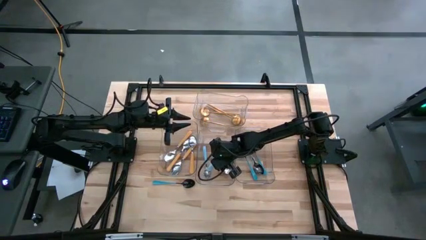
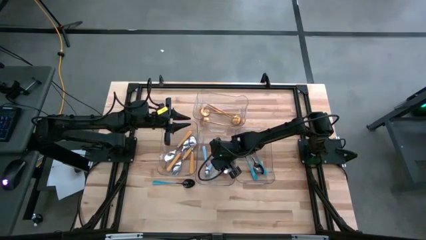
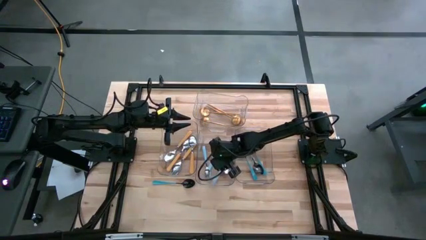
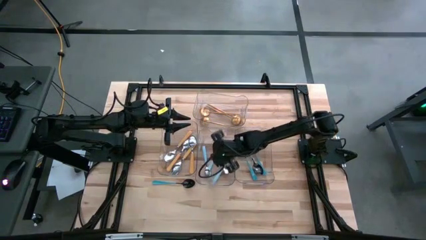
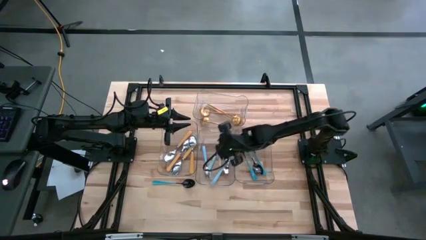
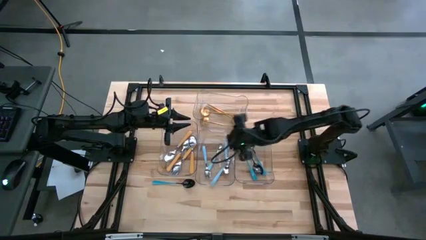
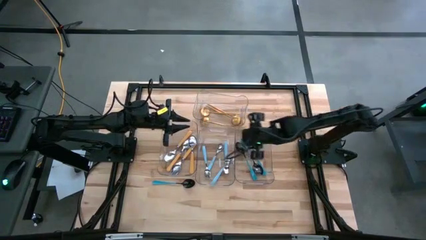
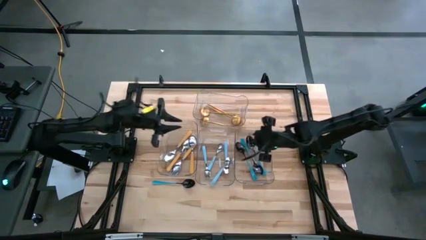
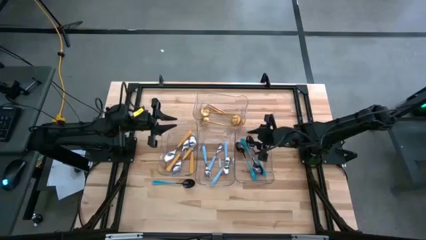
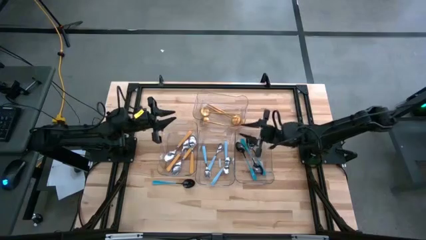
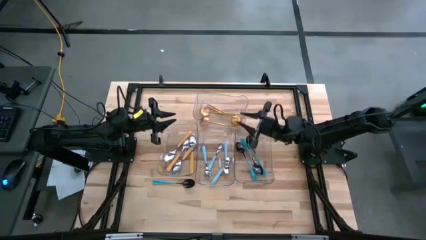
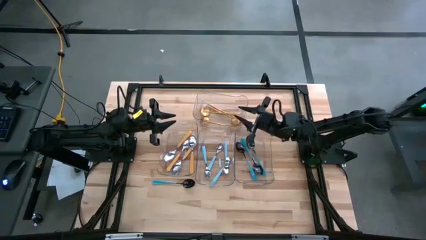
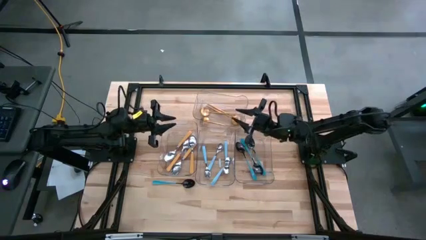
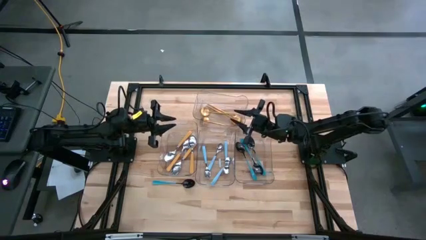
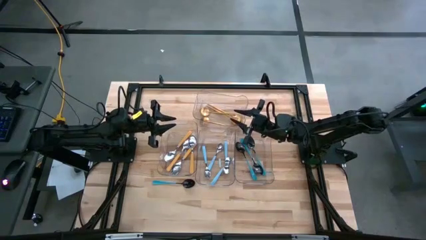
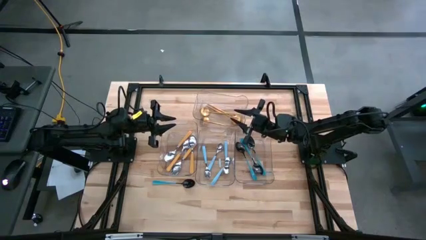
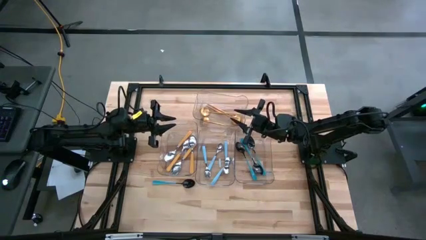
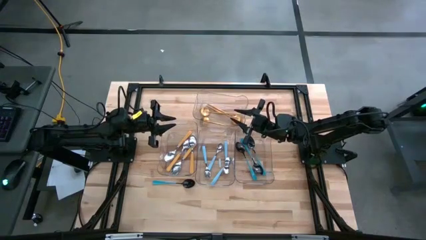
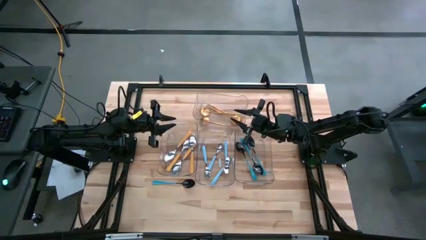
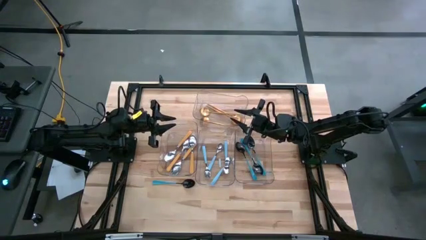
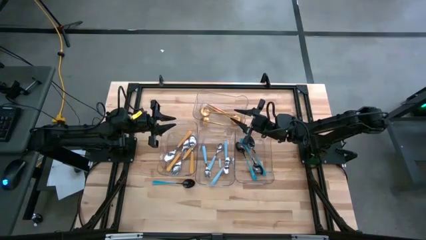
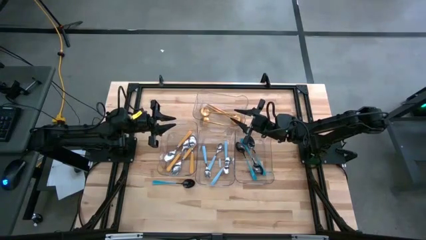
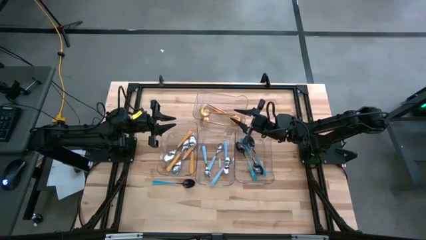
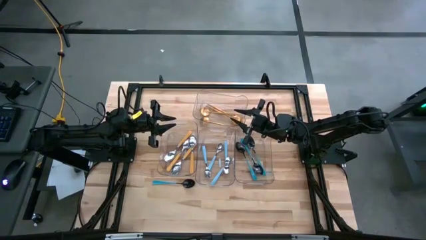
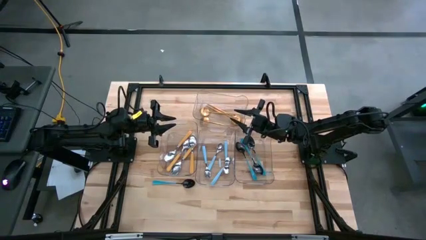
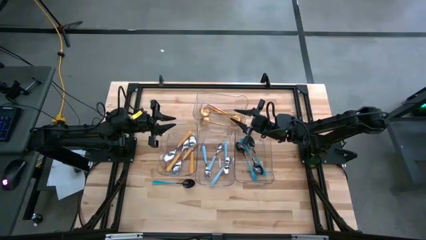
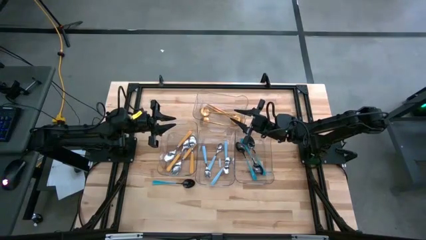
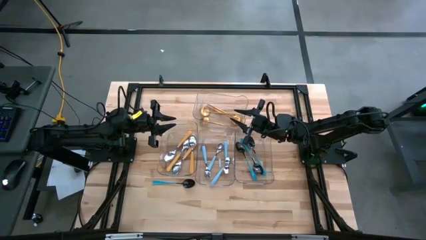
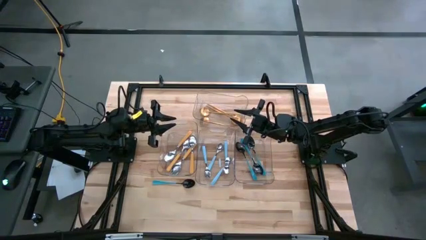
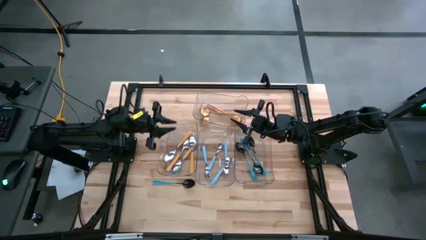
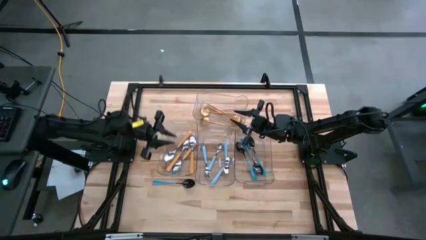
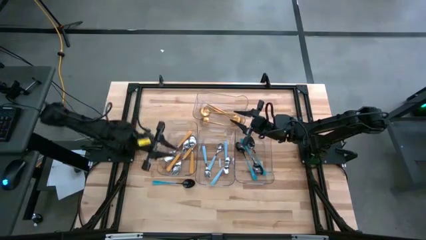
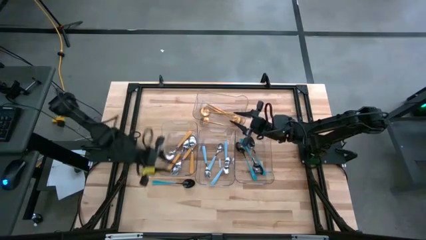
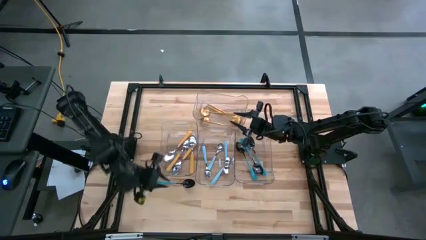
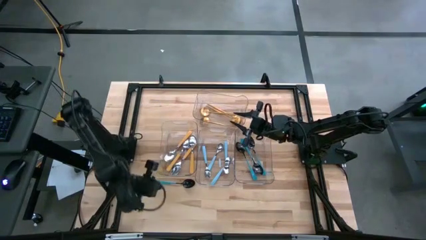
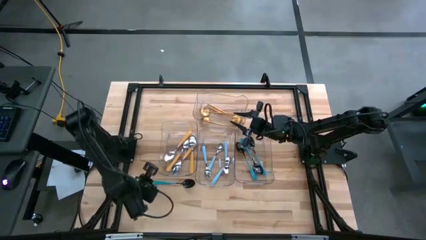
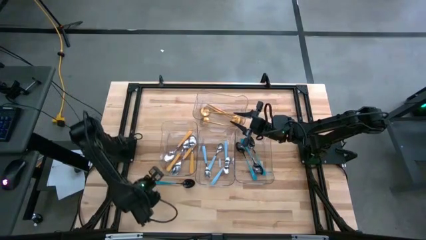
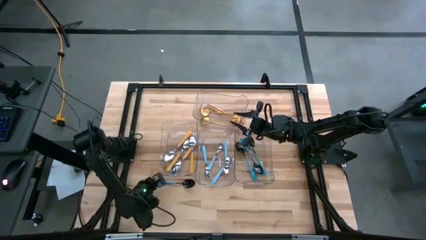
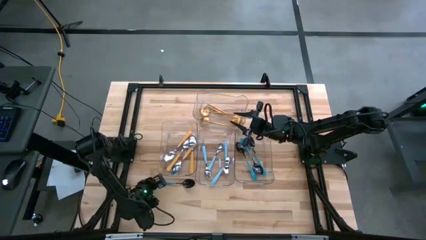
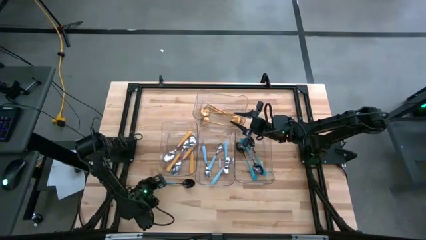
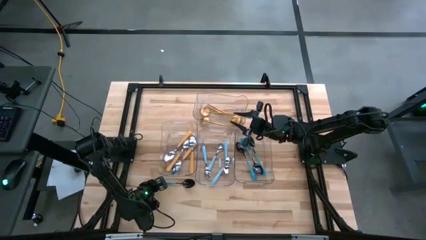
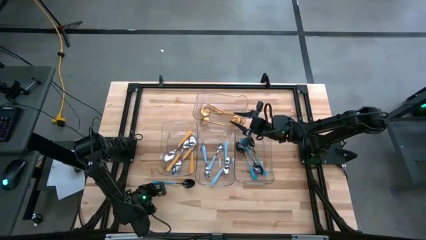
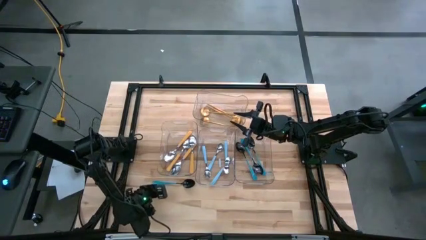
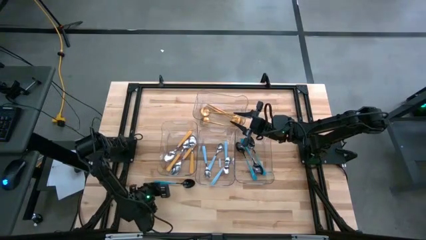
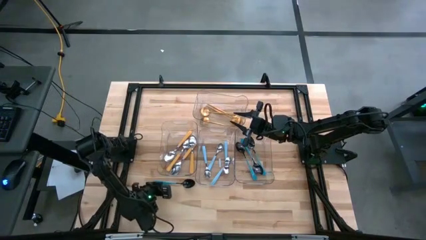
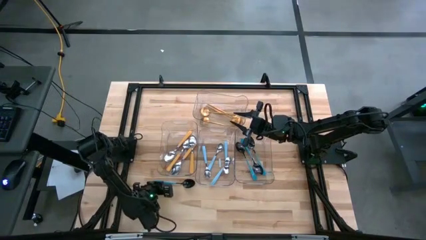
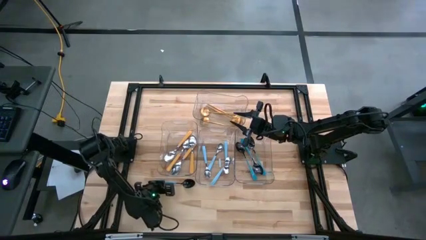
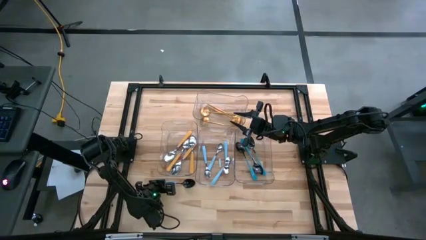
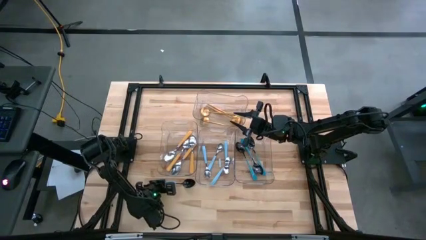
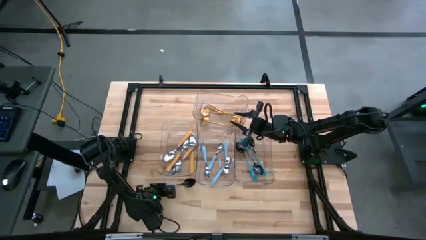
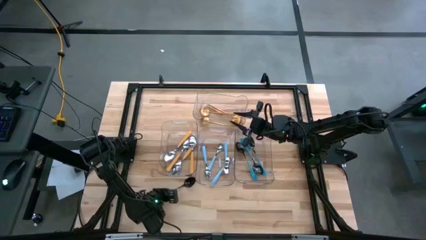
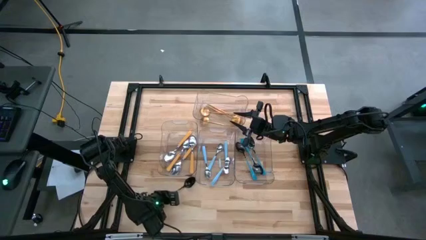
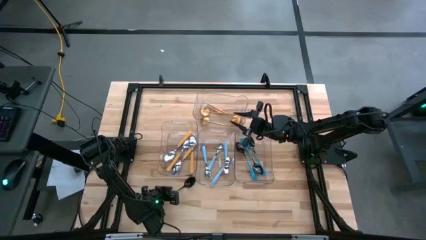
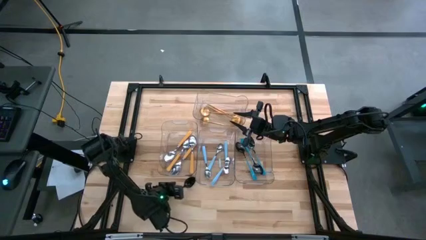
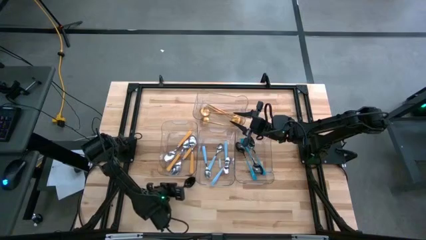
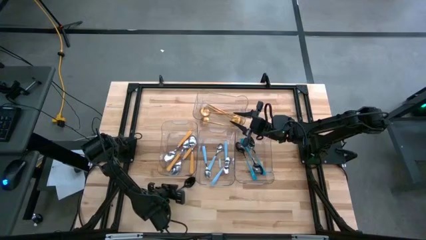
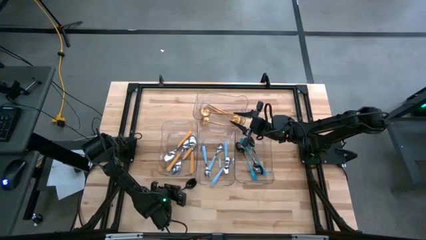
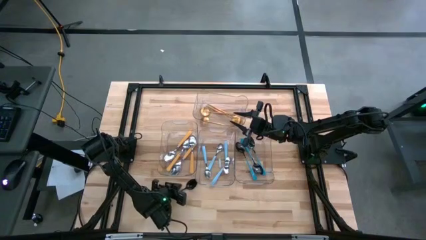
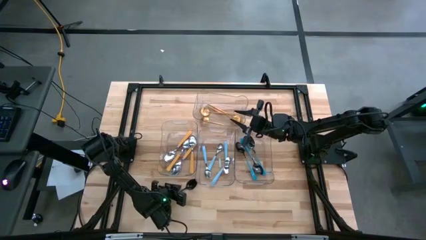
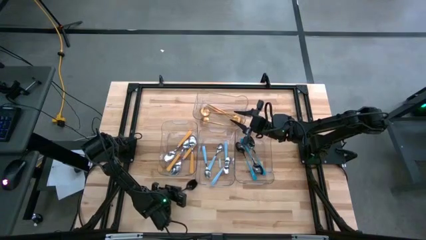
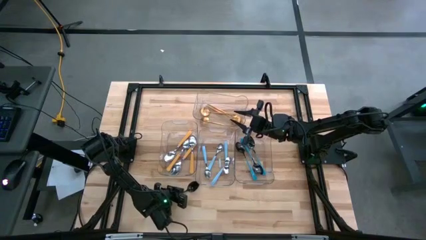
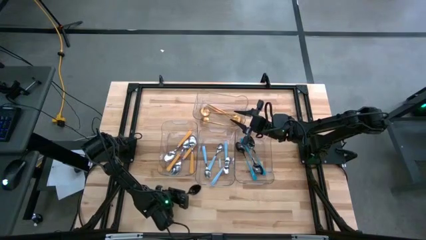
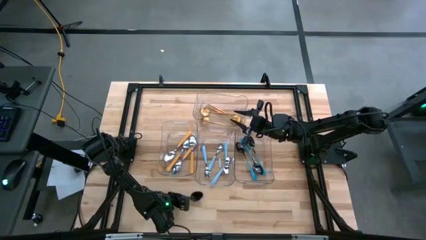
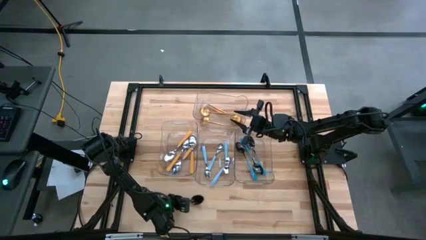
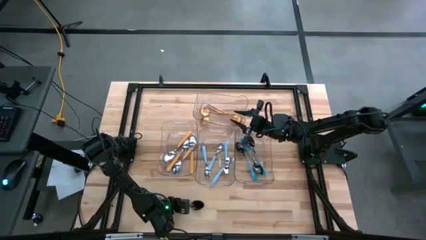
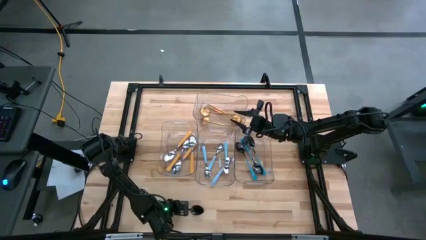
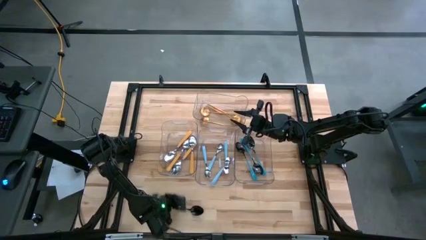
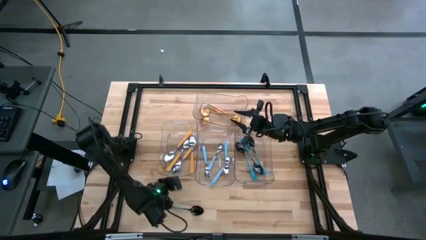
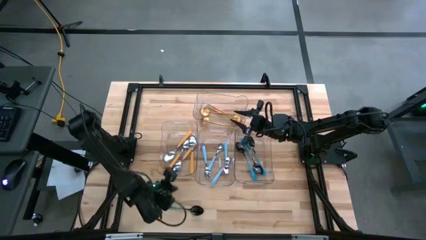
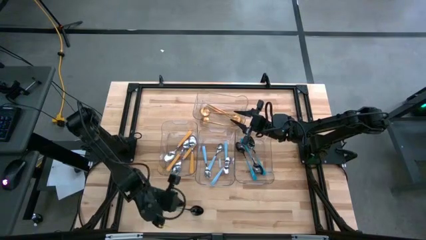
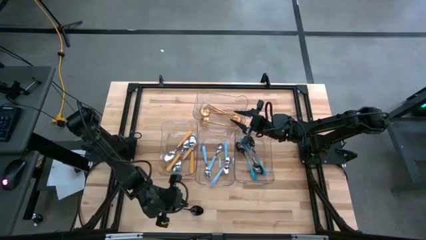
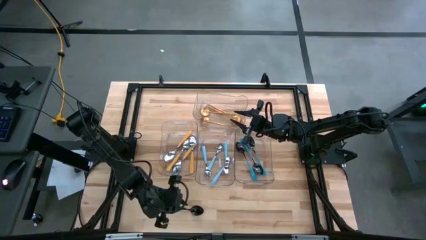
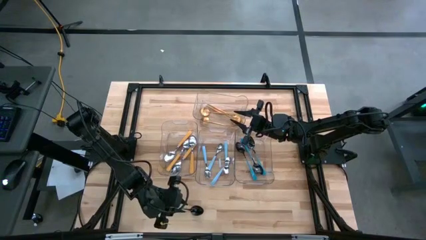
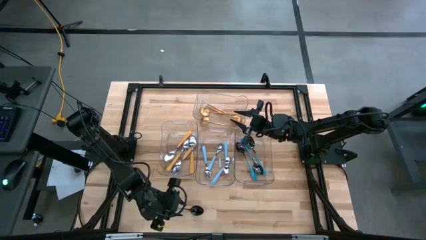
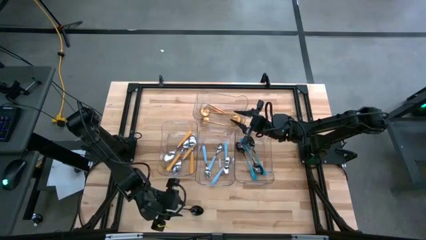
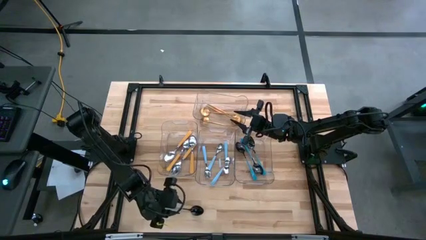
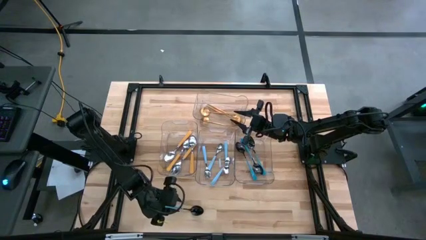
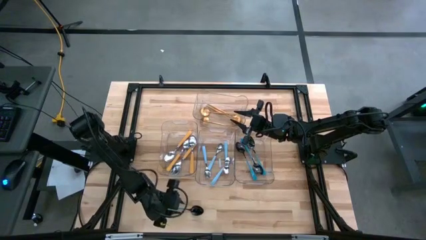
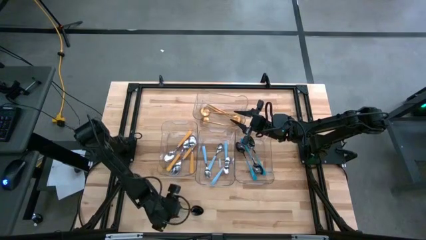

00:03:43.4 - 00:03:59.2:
Task: Sort silverware by color (type)
Put the blue spoon into the right transparent bin

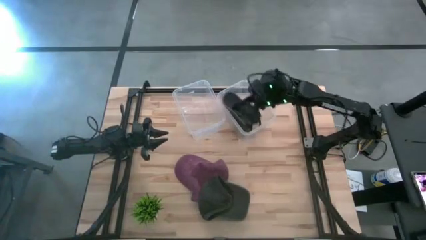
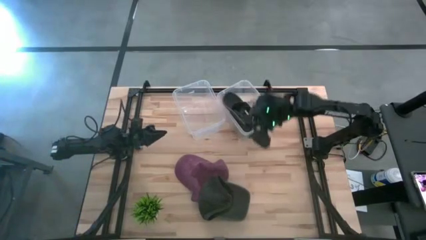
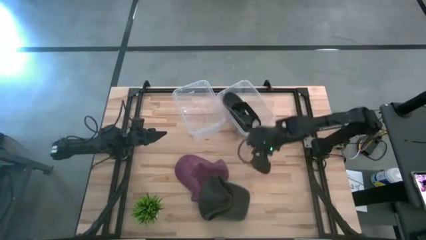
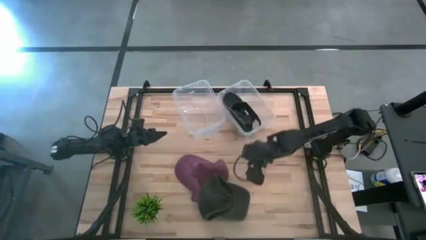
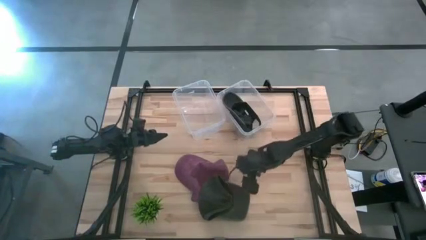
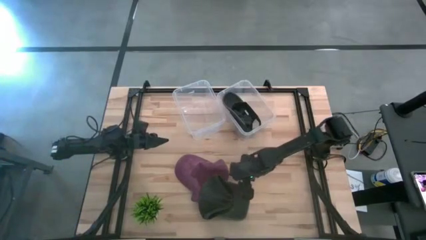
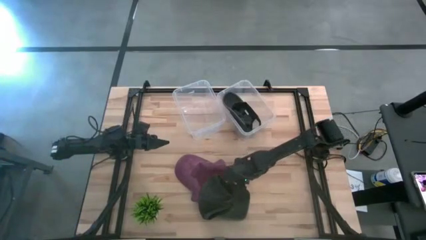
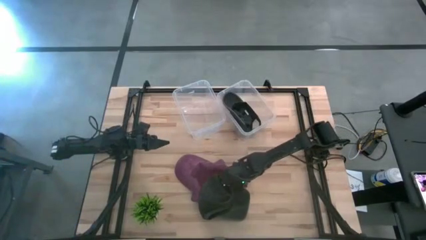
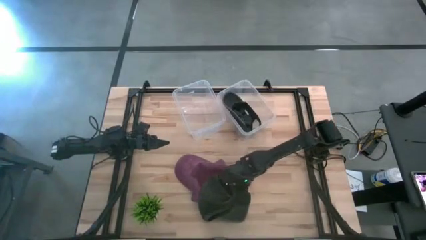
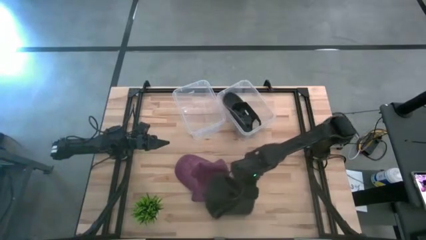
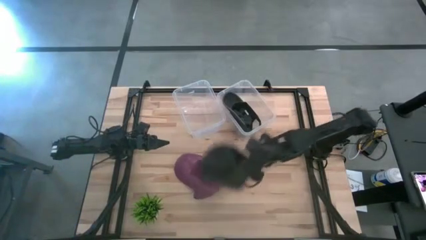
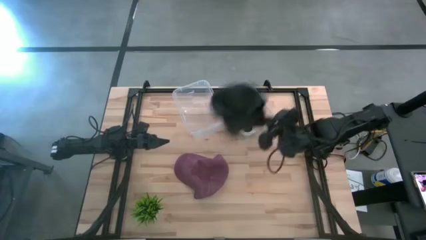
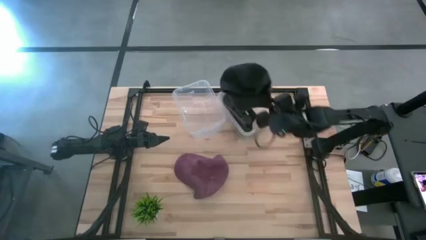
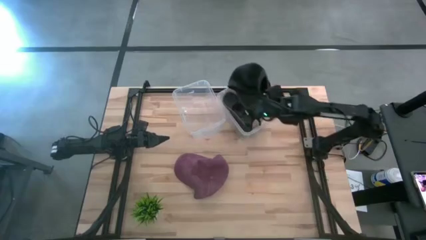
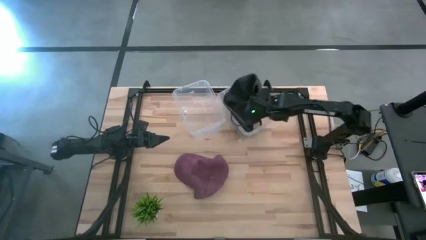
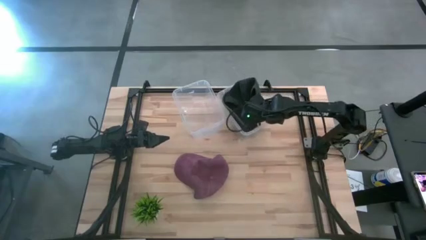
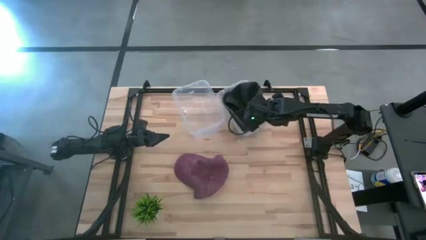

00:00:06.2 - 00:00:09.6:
Task: Pick & Place hat
Put the black cap into the right transparent bin
